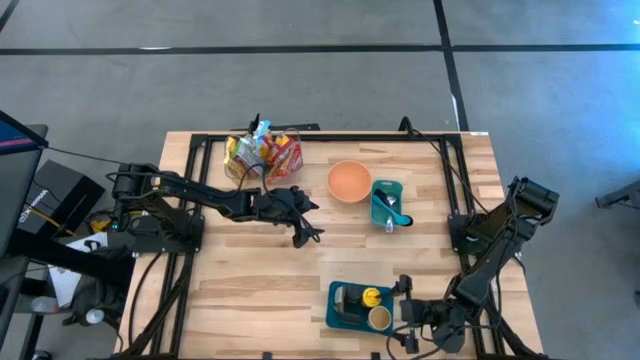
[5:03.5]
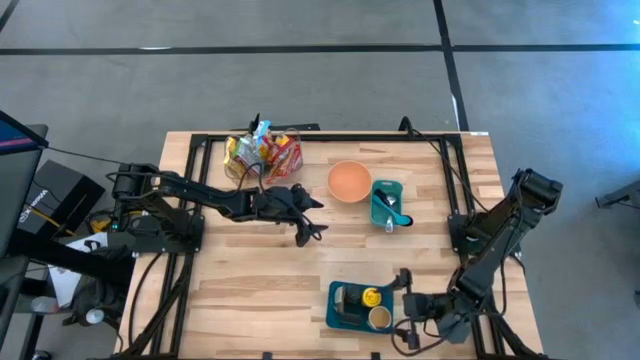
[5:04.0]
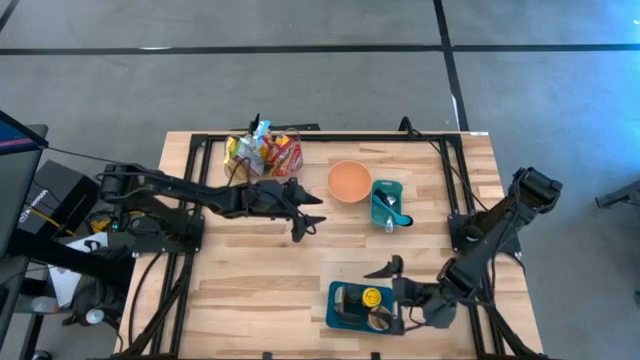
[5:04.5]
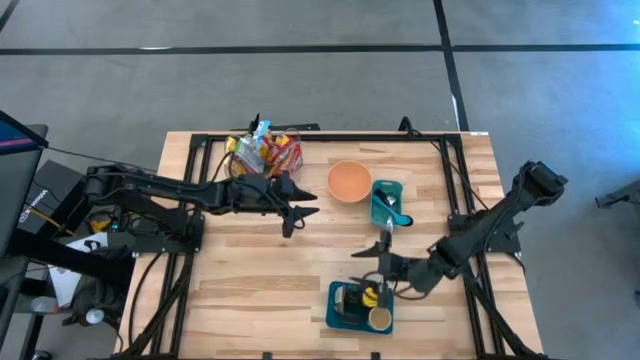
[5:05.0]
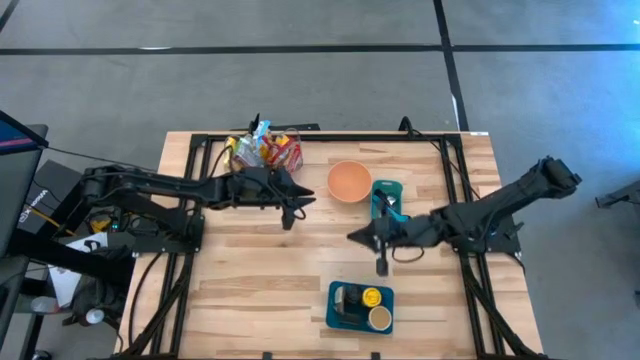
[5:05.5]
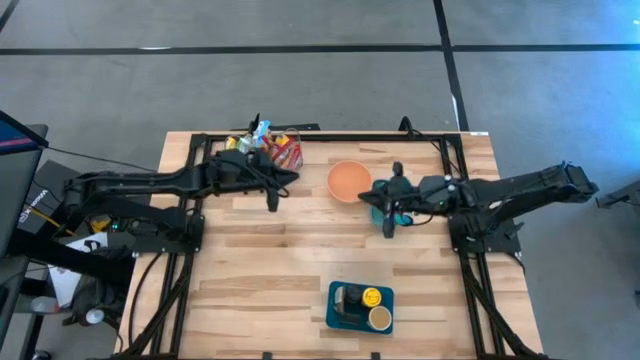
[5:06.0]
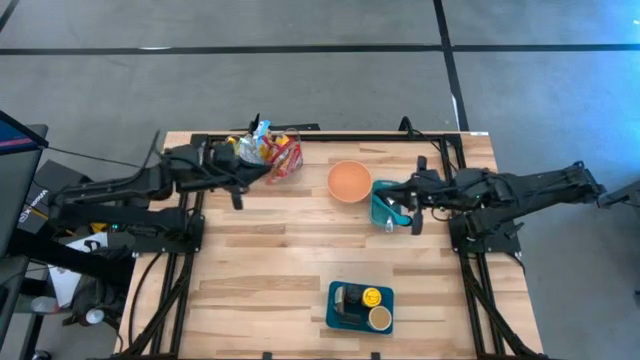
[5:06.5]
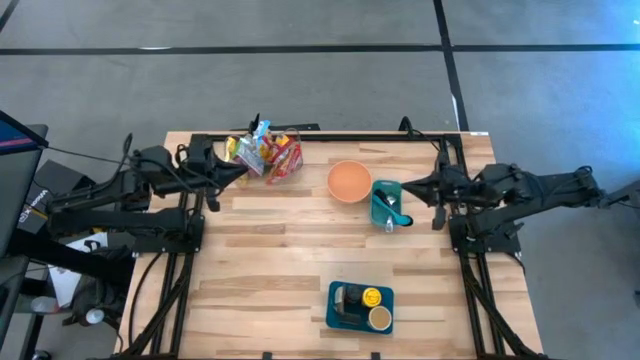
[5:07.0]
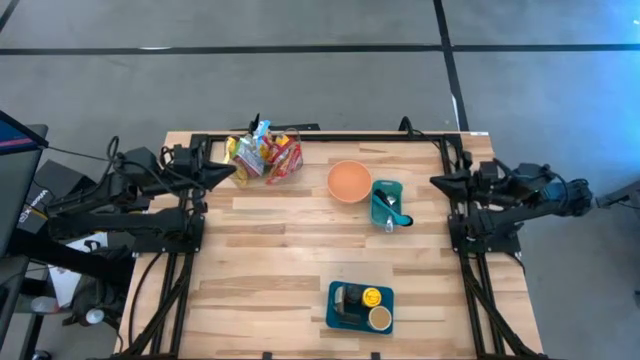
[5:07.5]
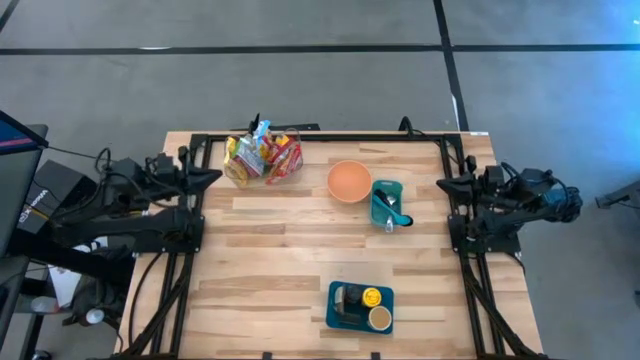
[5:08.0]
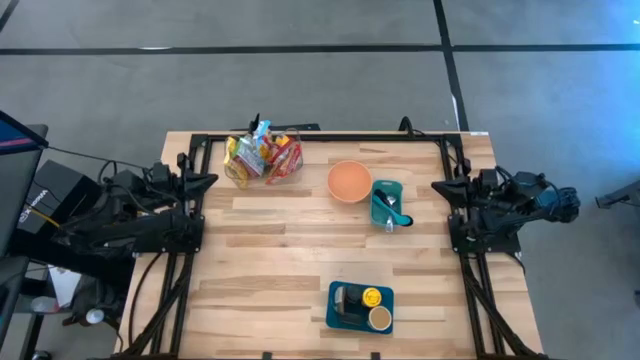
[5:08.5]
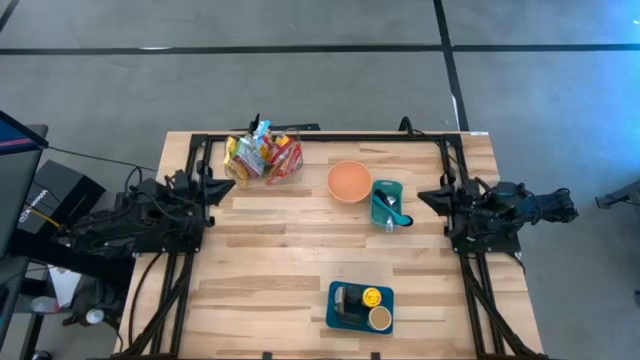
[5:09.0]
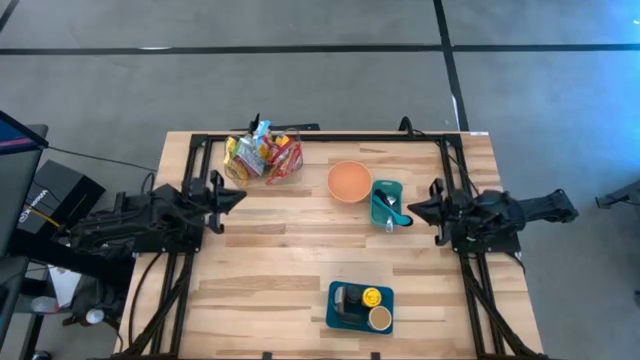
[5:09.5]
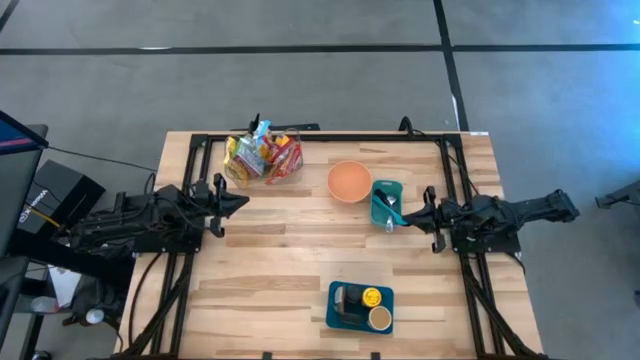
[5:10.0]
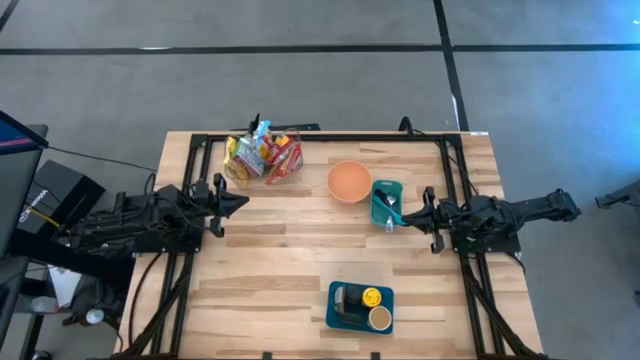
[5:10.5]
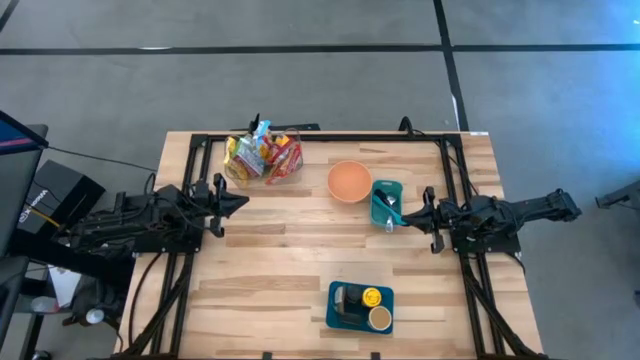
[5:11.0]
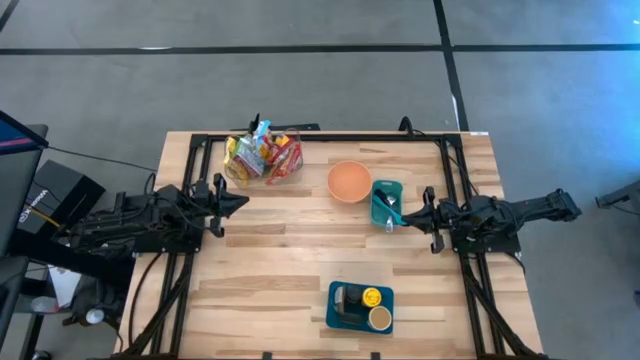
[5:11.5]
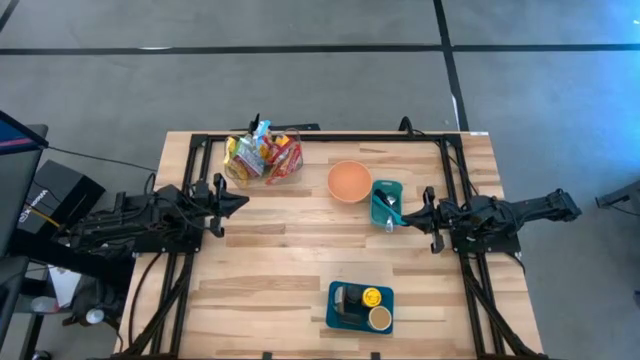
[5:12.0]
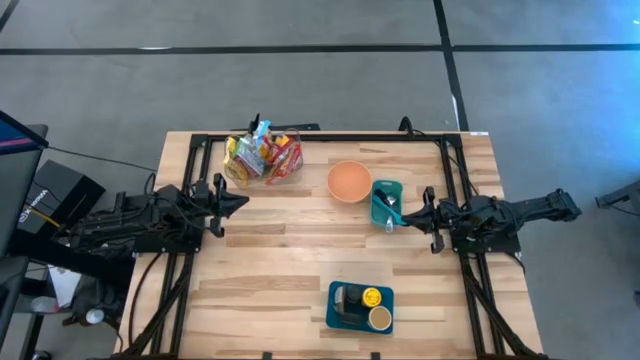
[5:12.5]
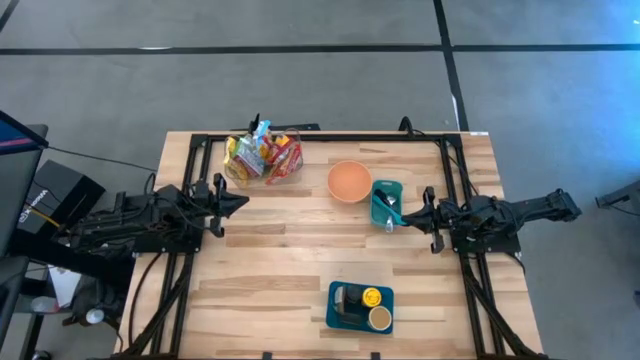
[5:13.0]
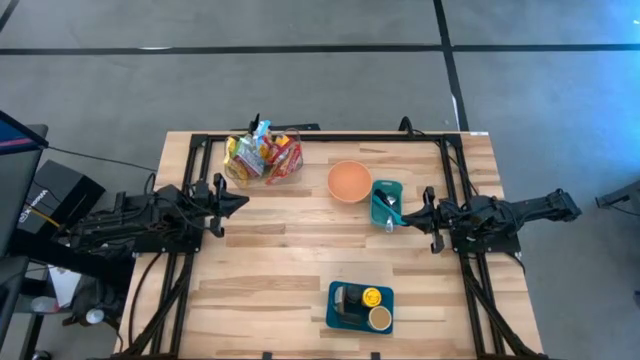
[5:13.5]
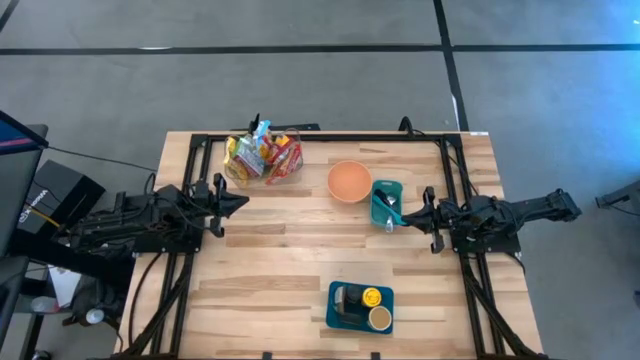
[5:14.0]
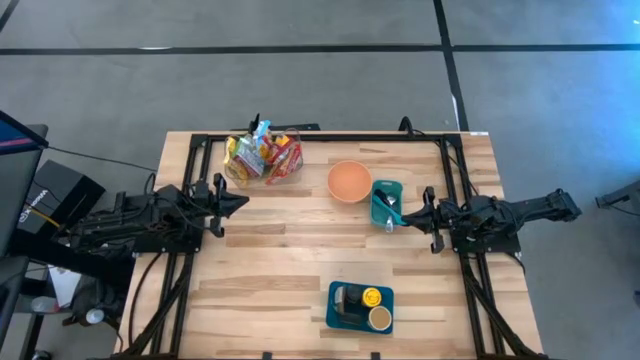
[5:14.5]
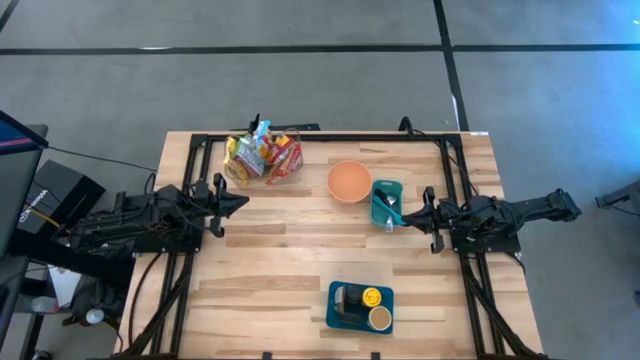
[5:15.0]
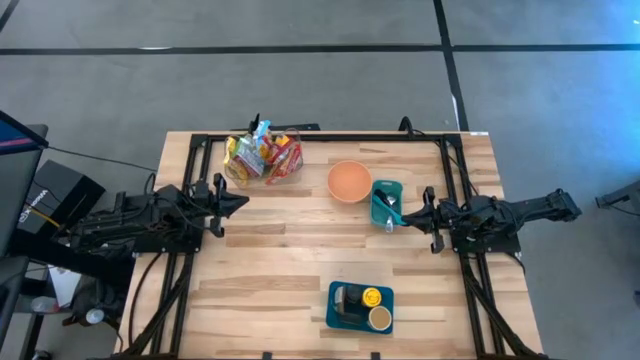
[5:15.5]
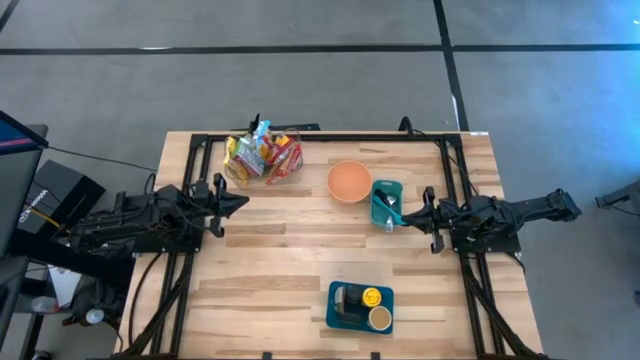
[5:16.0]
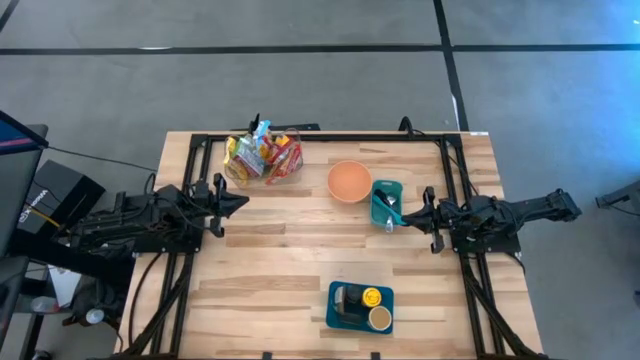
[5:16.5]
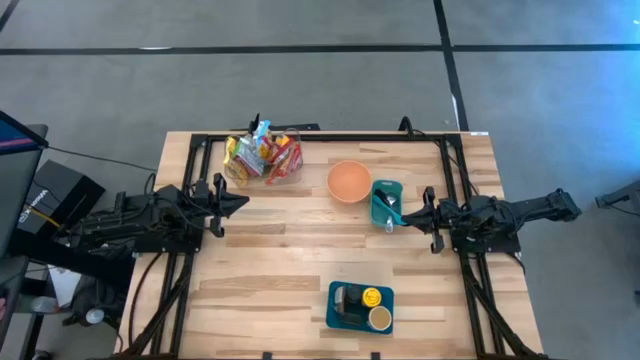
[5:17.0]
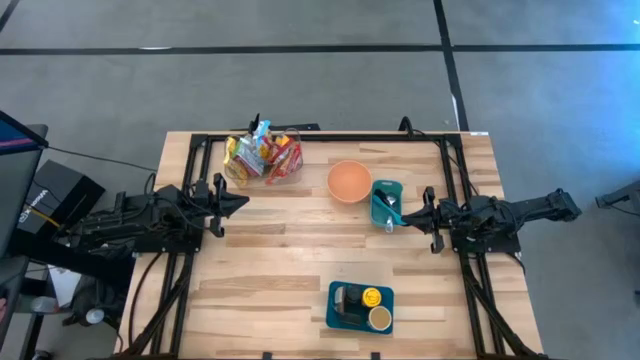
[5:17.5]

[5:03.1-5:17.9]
Task: Pick & Place Food Item
Return to Home Position

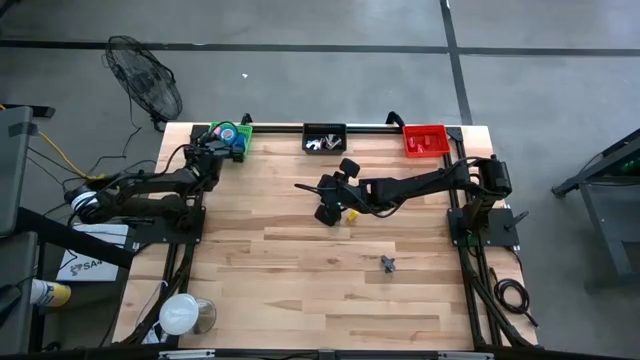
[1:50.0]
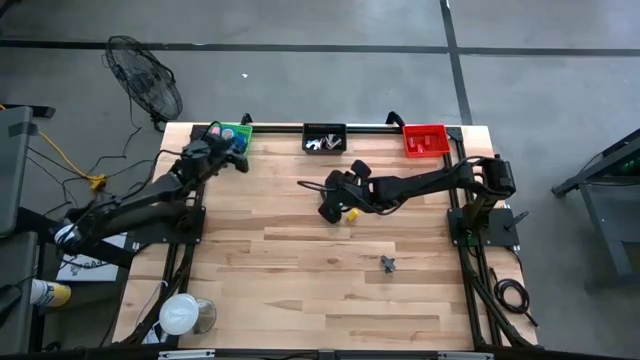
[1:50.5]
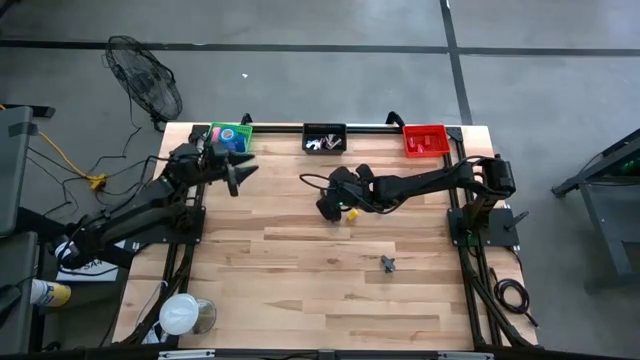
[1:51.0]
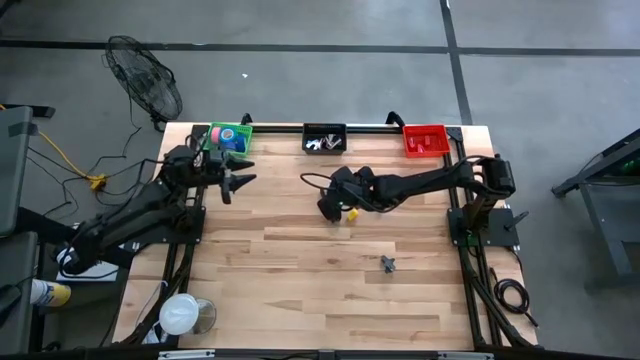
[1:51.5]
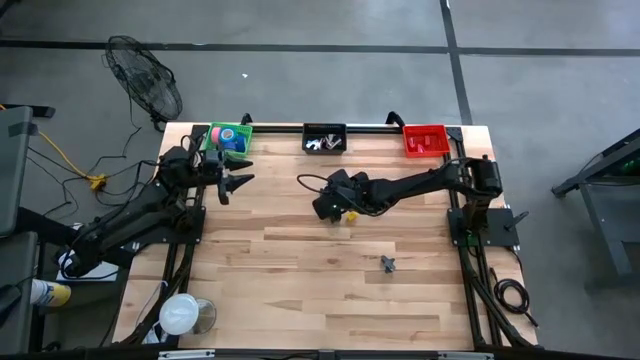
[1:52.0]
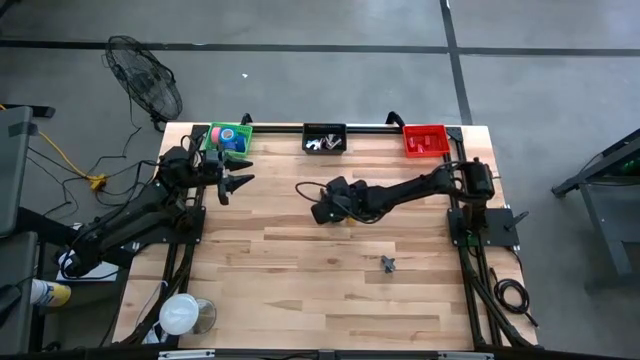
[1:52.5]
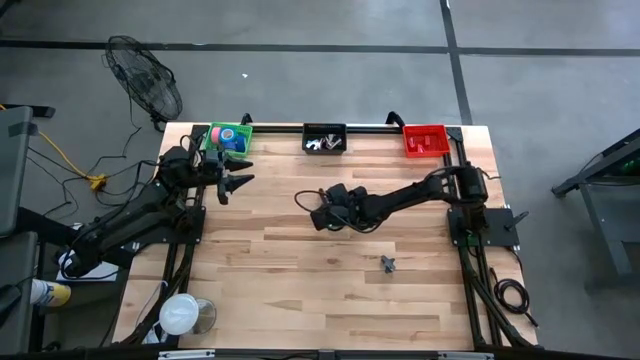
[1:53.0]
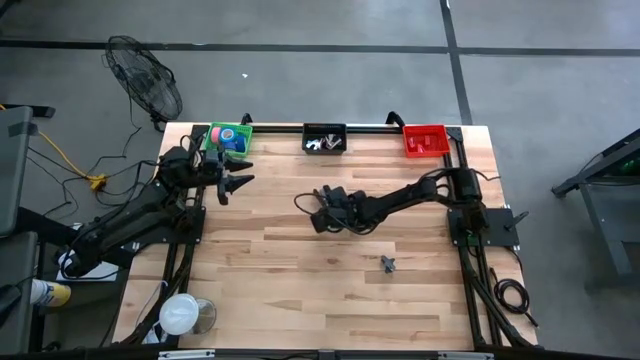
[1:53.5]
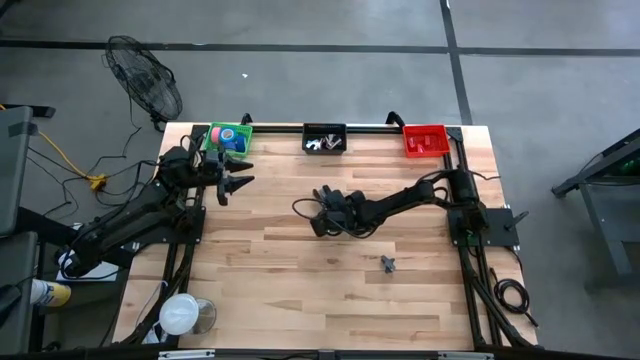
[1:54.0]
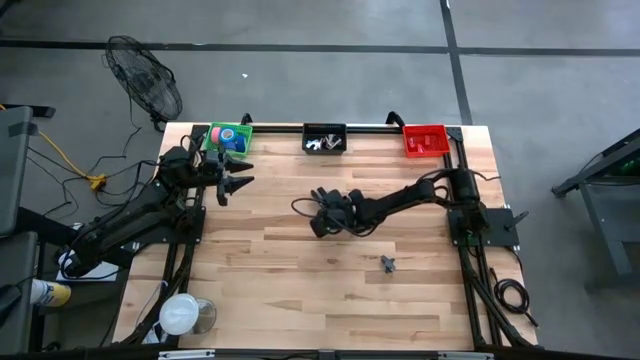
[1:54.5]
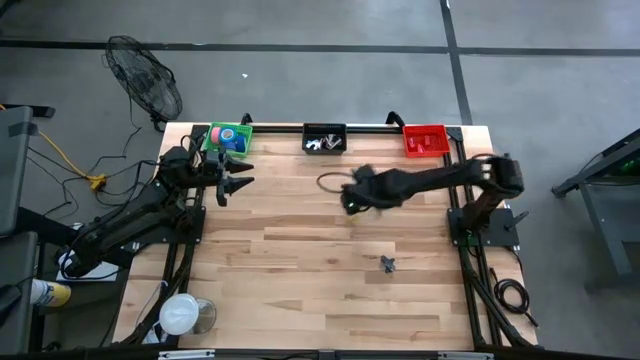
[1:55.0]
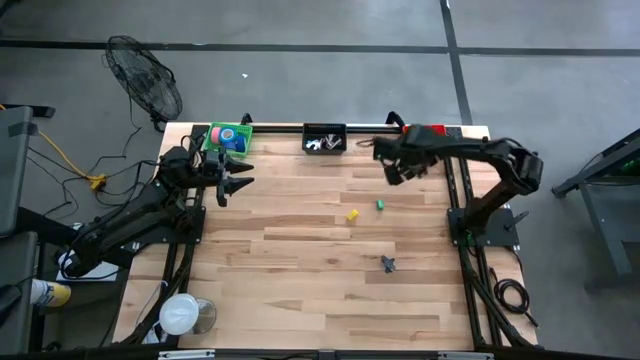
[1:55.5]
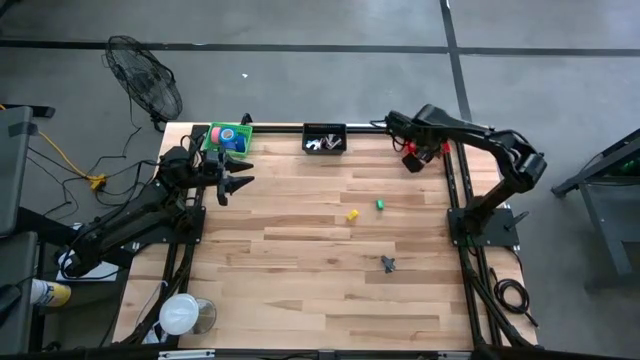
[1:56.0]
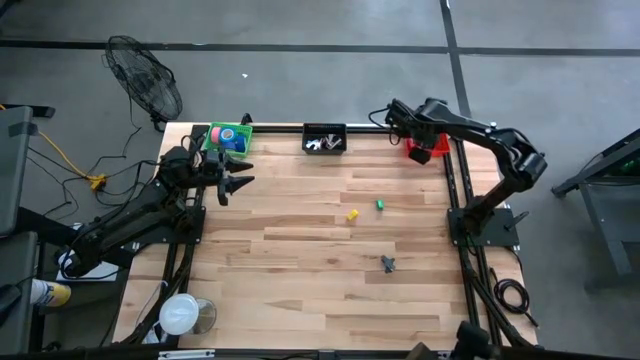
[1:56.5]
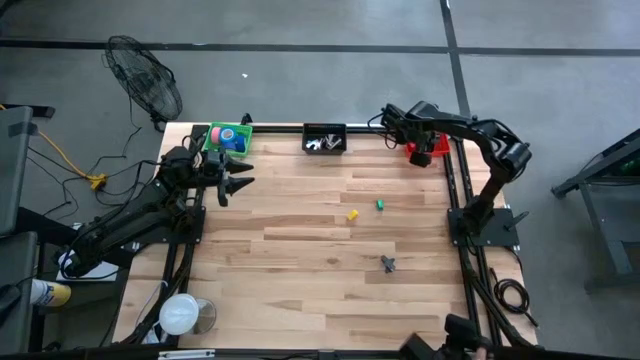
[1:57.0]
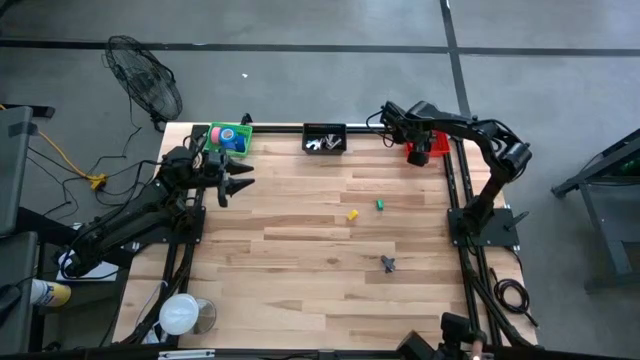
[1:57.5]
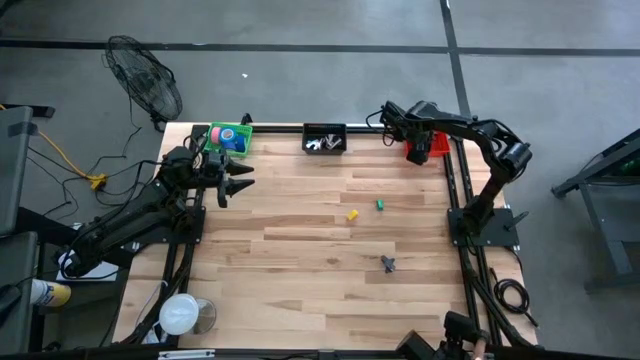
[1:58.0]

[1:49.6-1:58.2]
Task: Pick and place Stapler, Stapler remover, tape
Put the black stapler in the red bin
